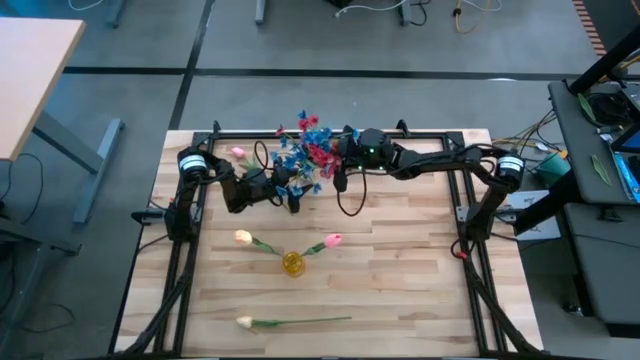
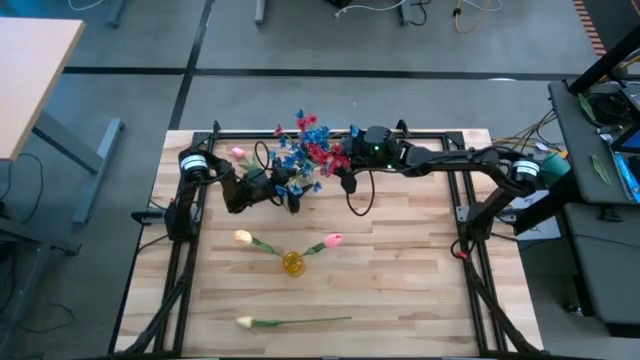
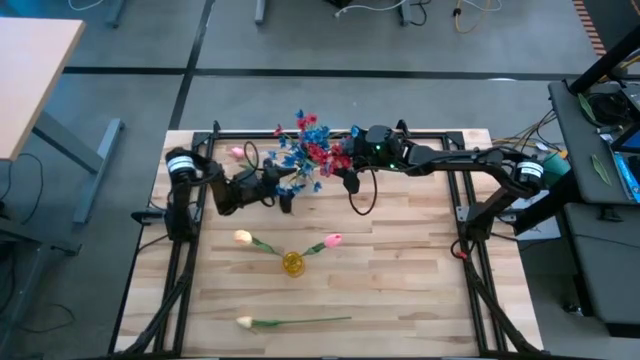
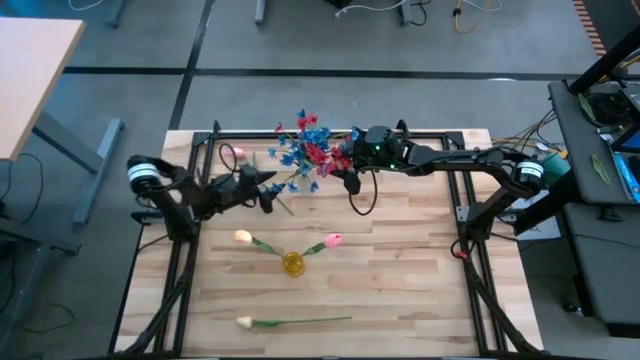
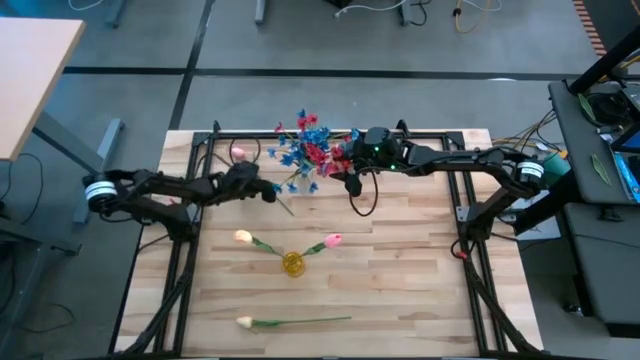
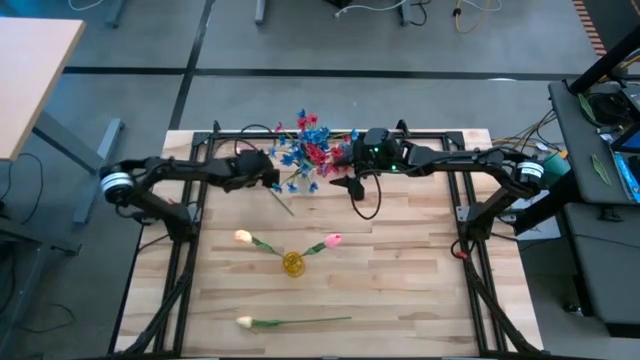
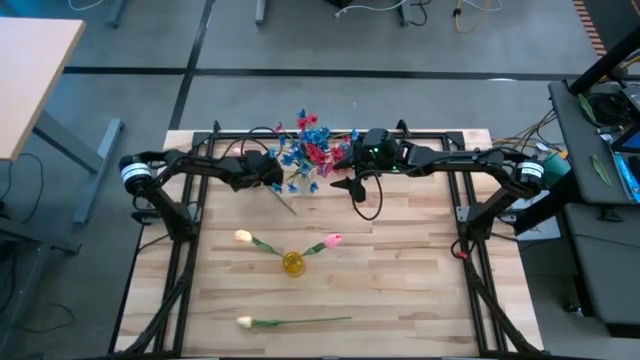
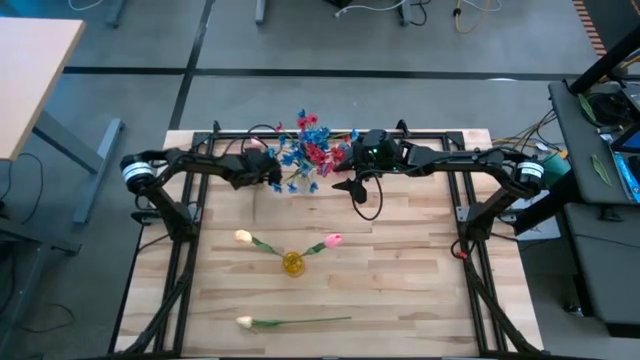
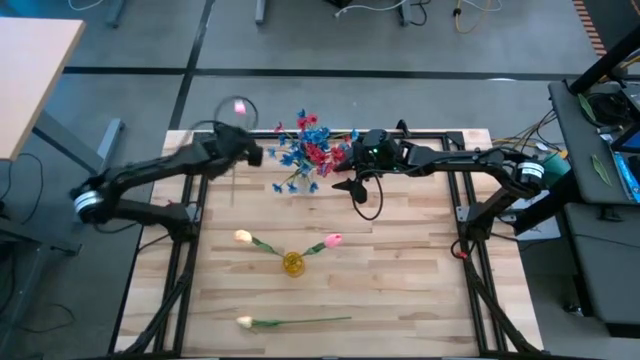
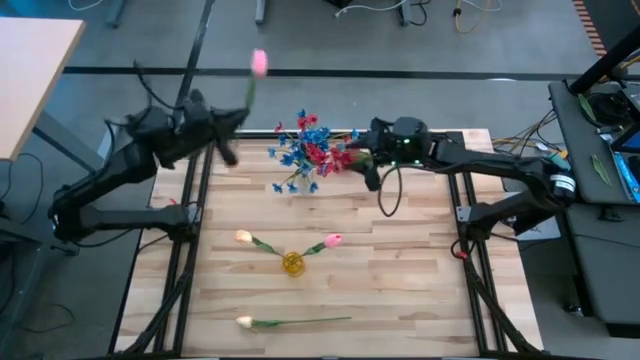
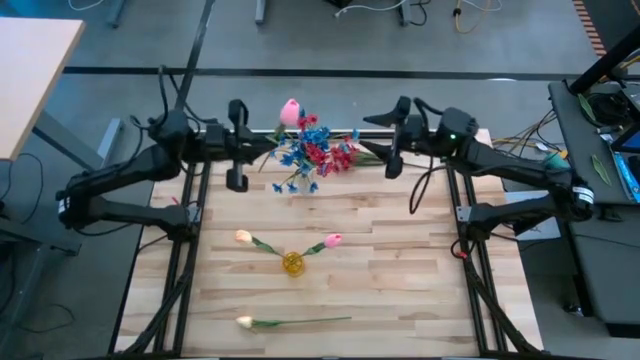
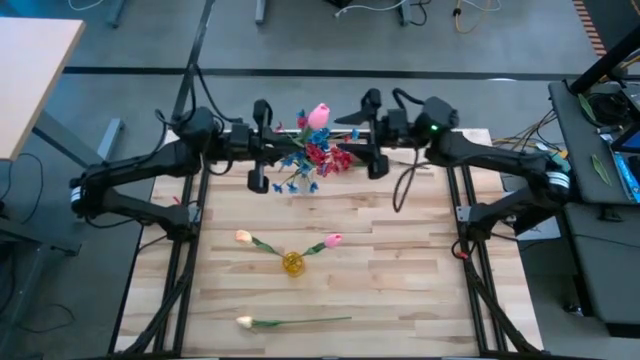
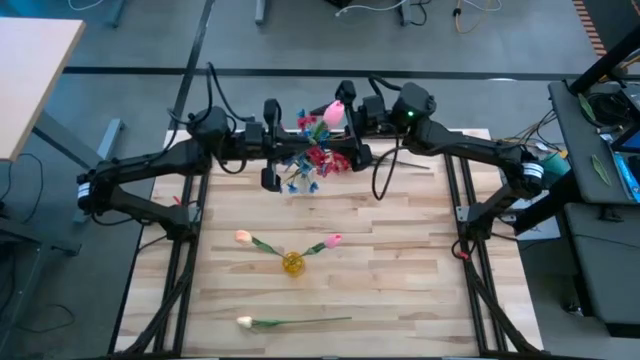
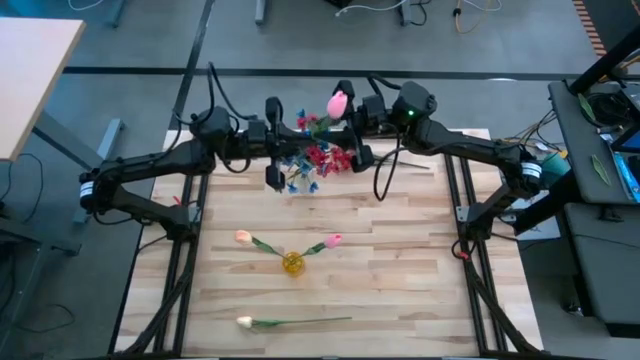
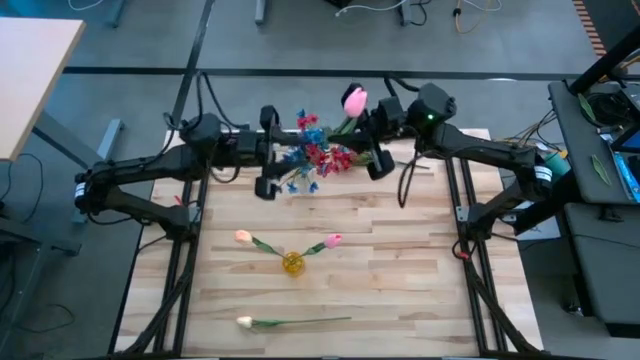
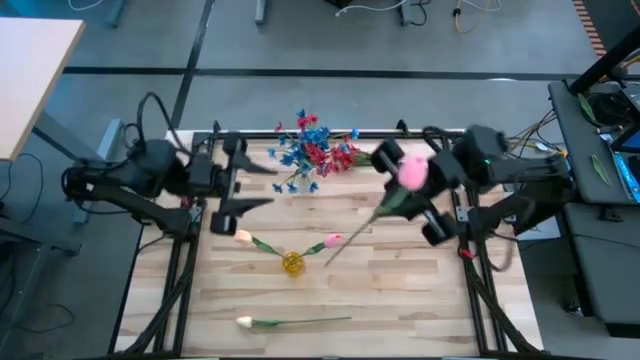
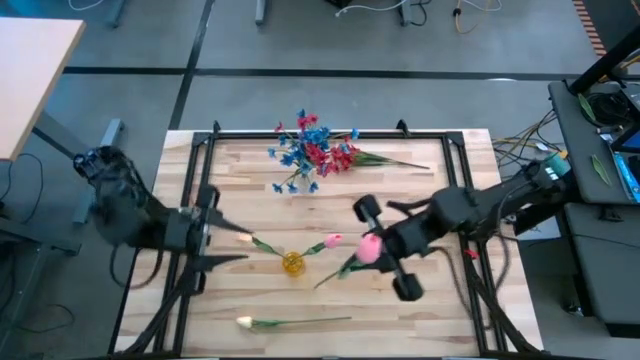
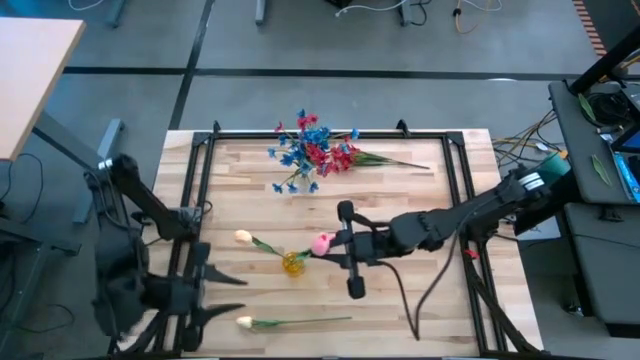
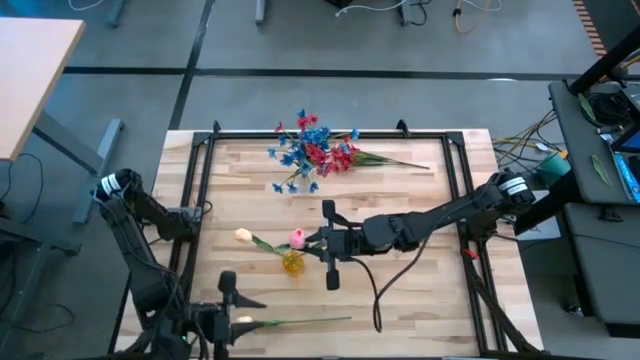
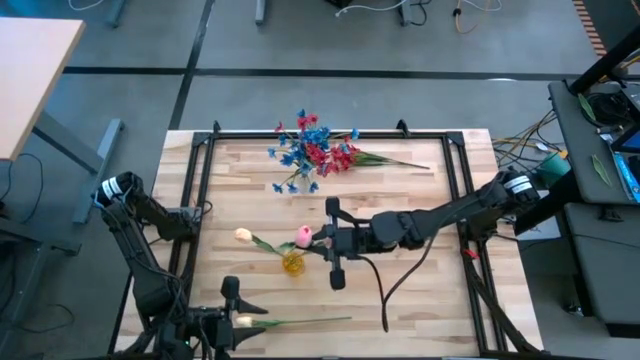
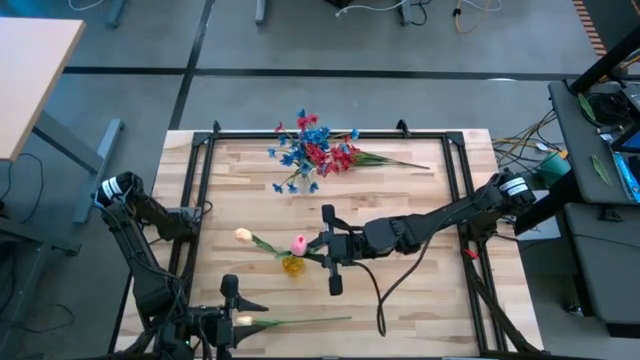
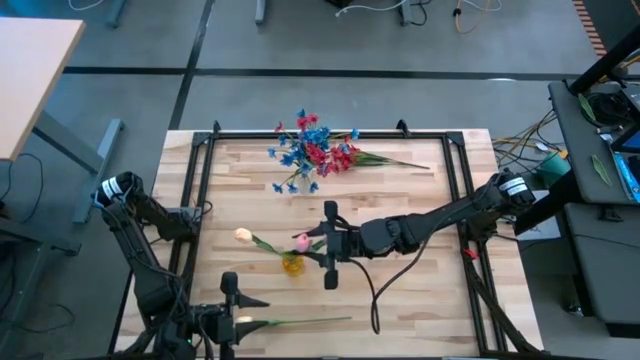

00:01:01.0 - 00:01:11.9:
Task: Sort flowers into vase by color
Put the pink tulip into the yellow vase

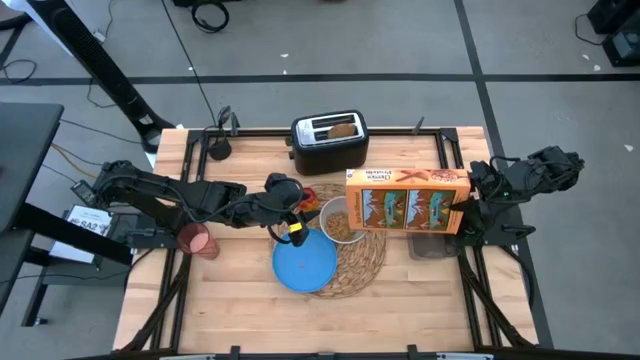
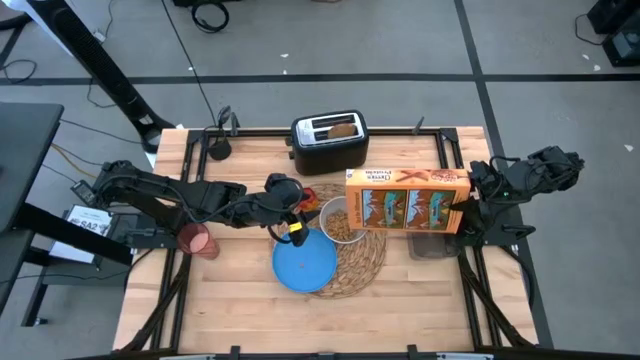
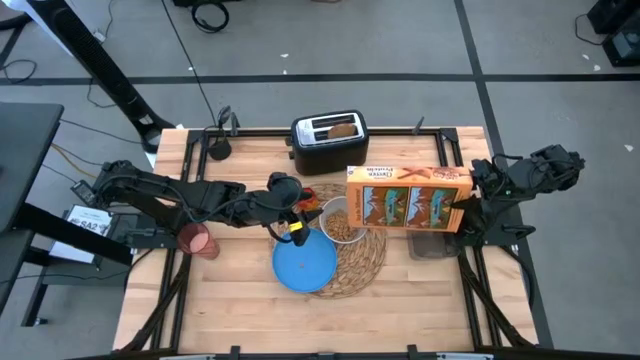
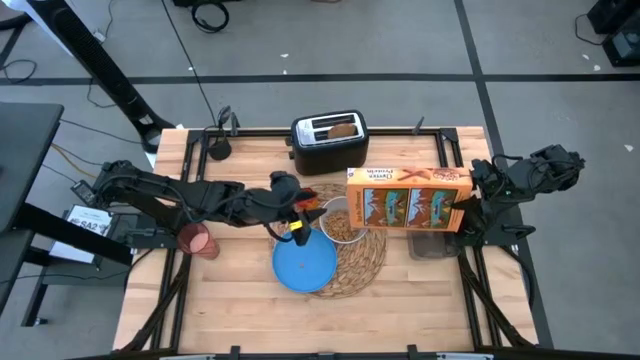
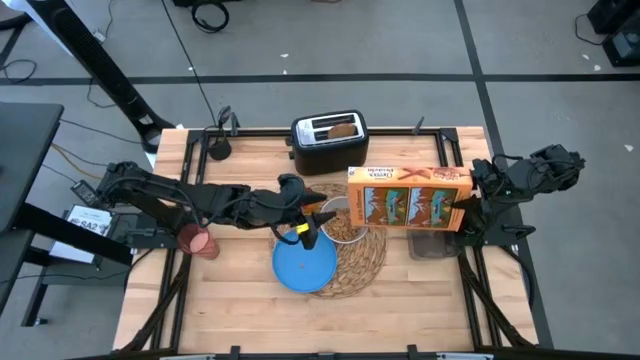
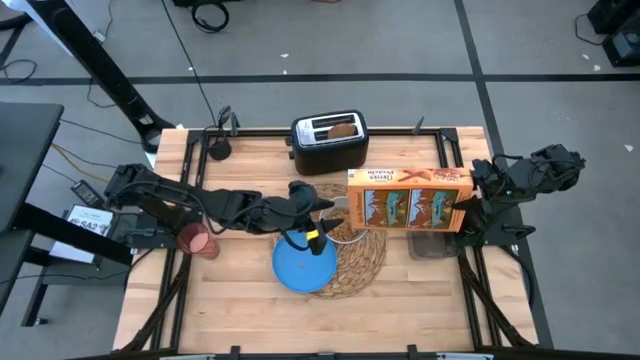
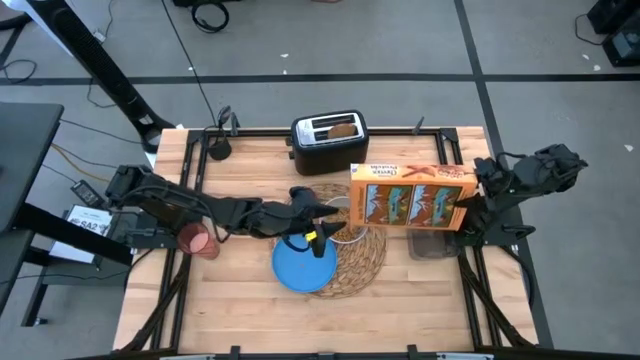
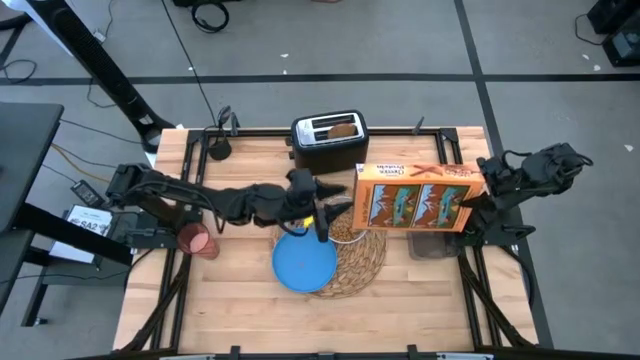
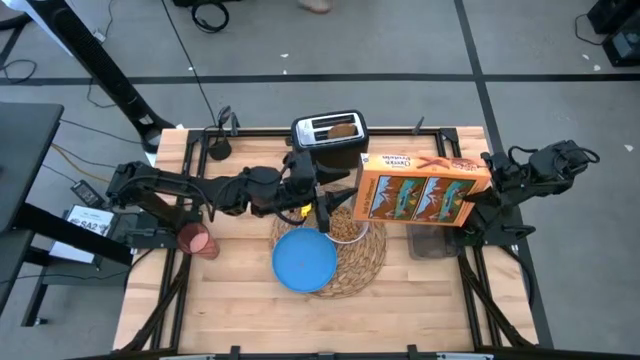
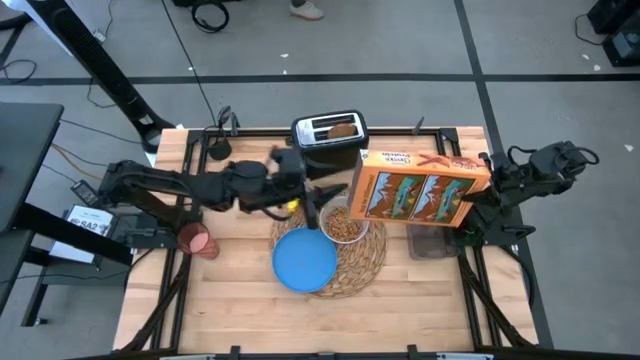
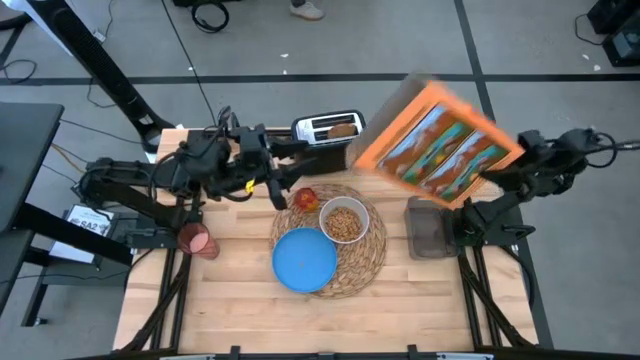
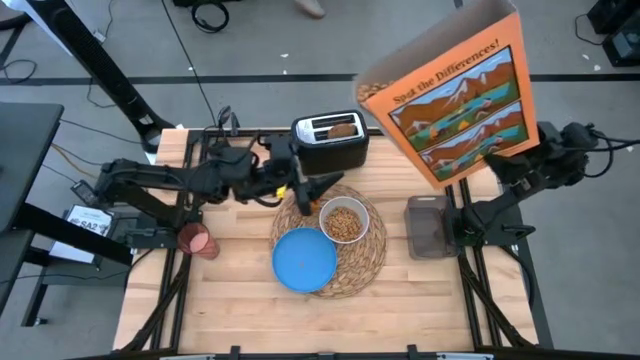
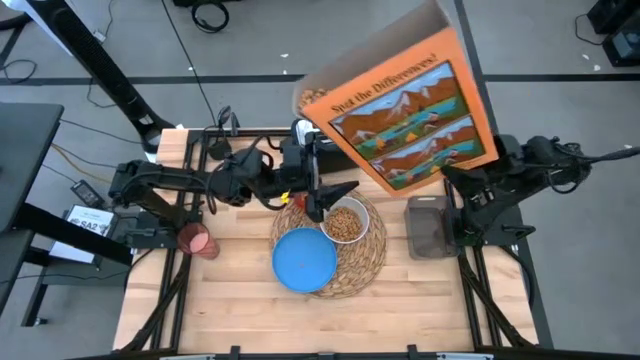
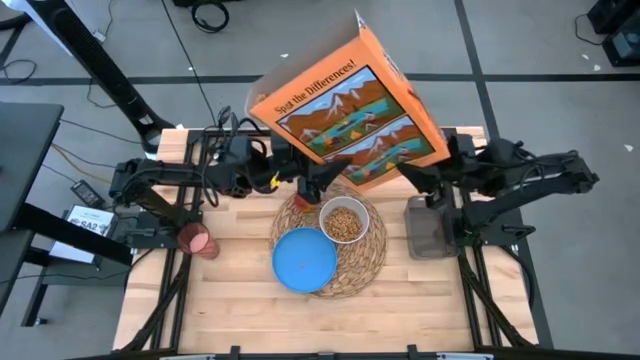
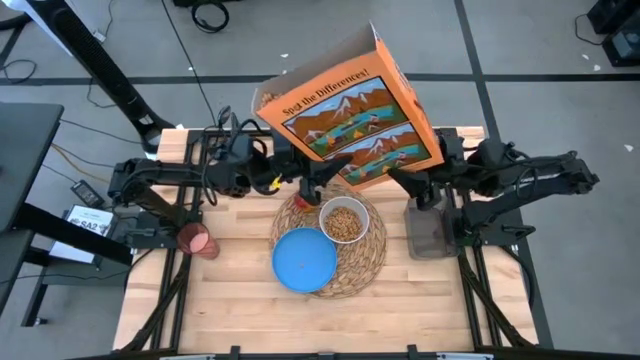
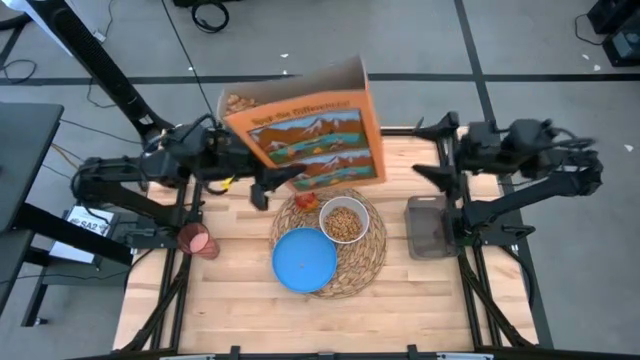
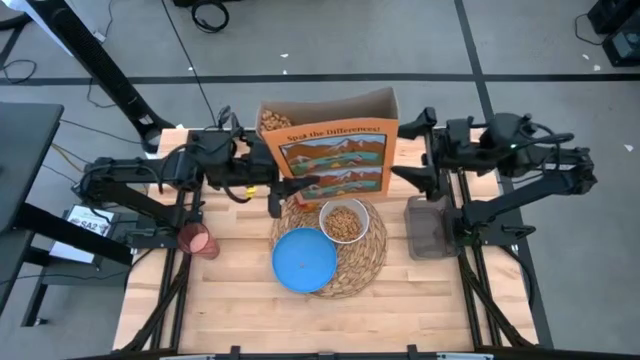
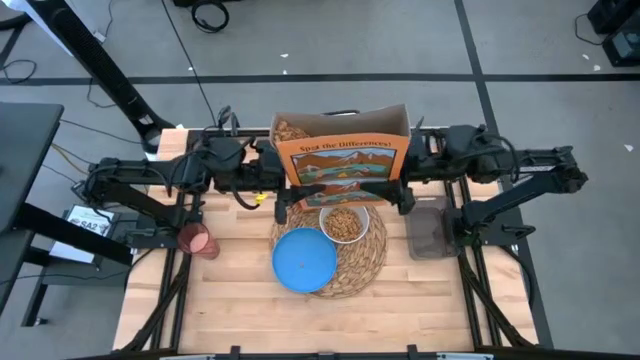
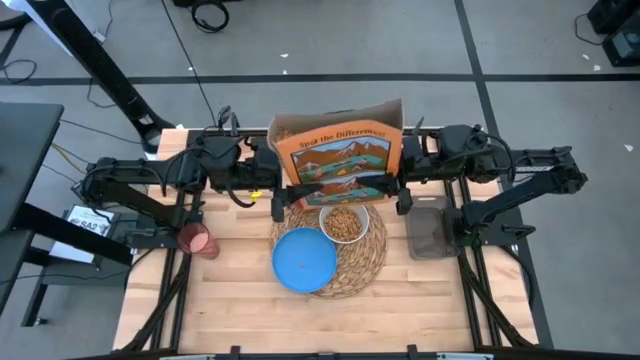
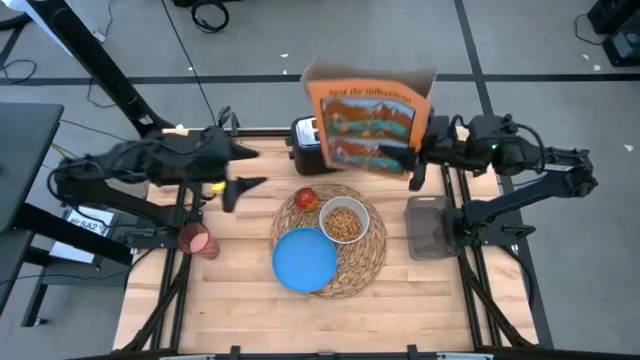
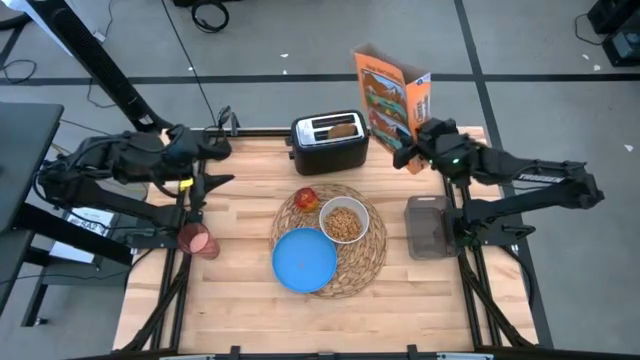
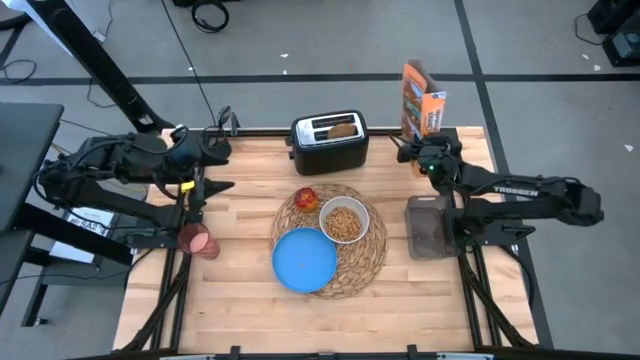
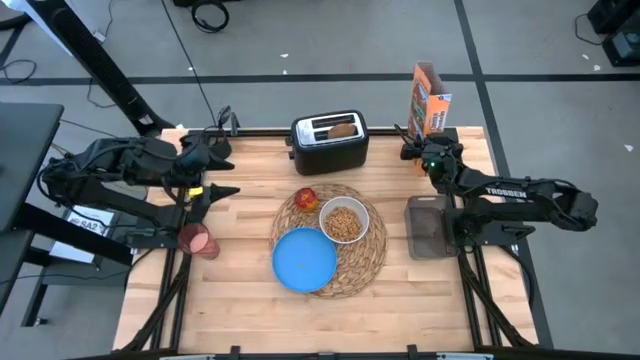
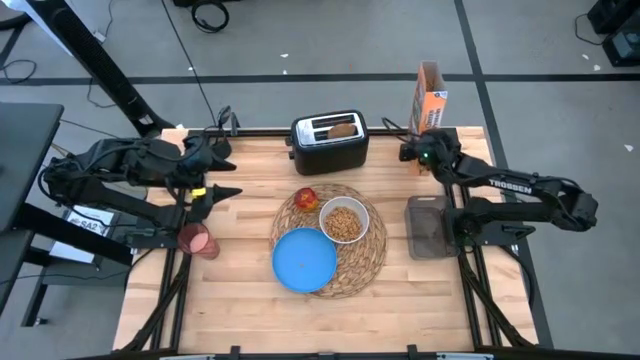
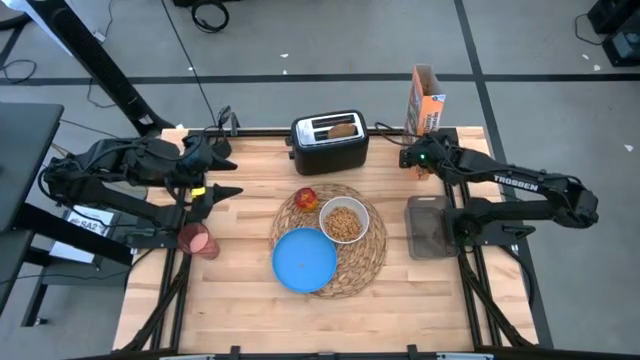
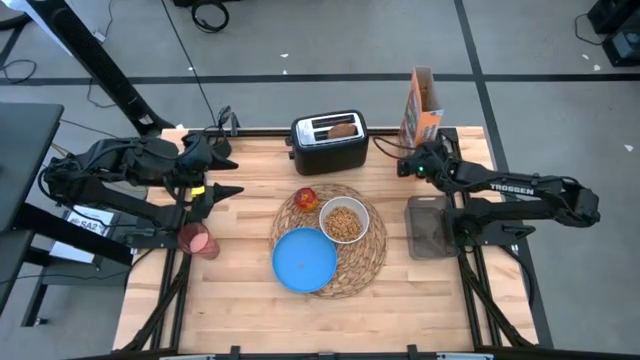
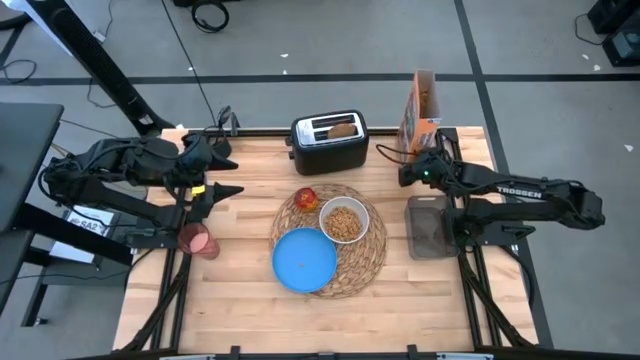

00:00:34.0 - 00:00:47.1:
Task: Arrange a breakfast setting
Pour the cereal into the white bowl
